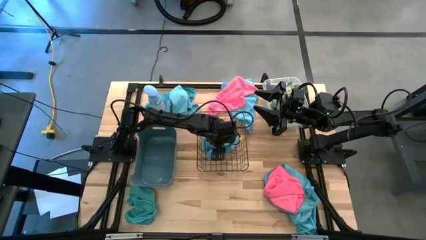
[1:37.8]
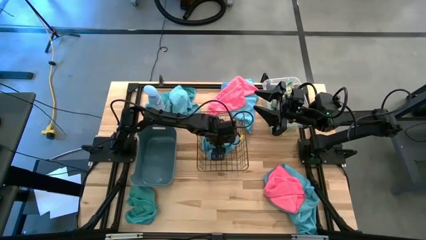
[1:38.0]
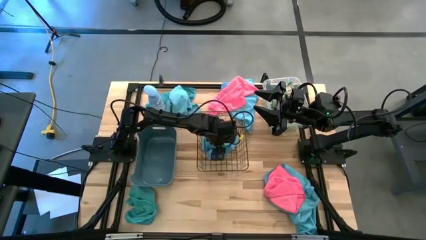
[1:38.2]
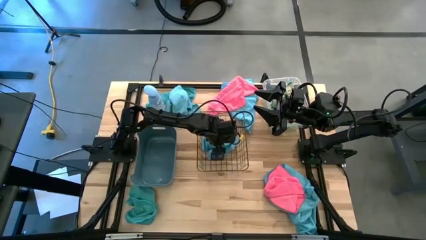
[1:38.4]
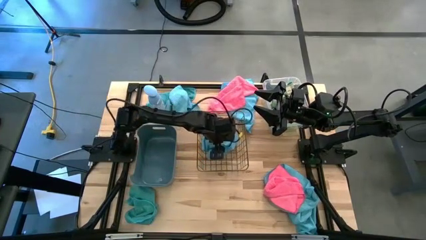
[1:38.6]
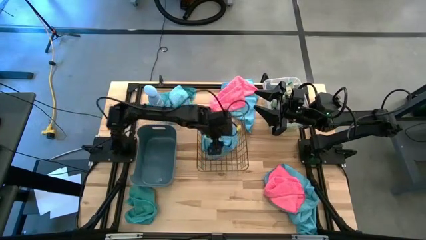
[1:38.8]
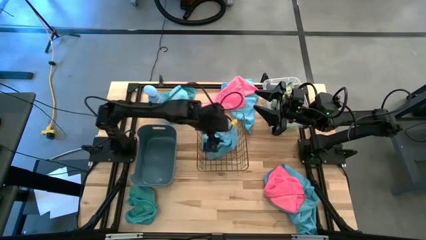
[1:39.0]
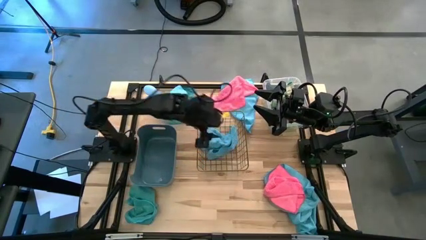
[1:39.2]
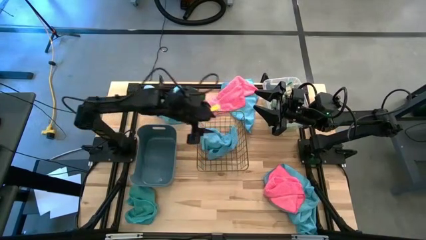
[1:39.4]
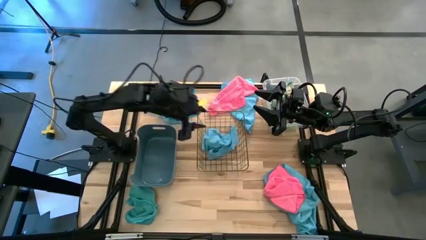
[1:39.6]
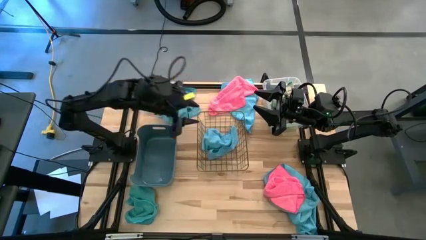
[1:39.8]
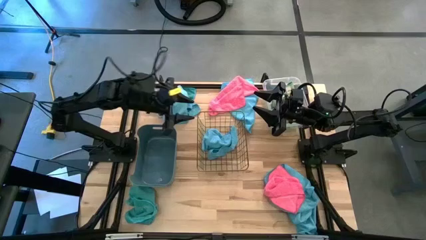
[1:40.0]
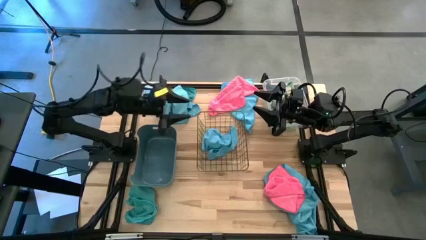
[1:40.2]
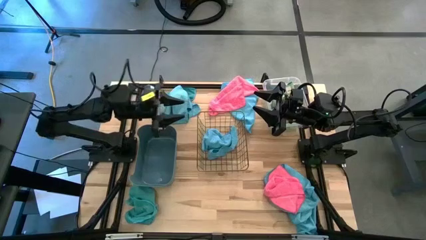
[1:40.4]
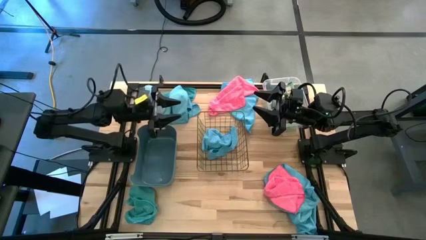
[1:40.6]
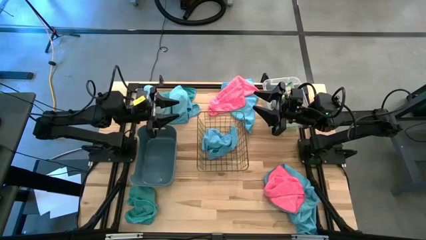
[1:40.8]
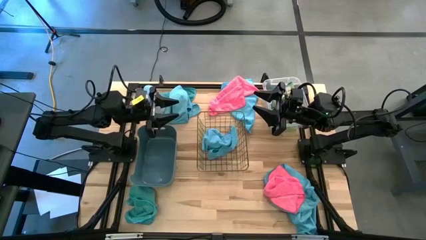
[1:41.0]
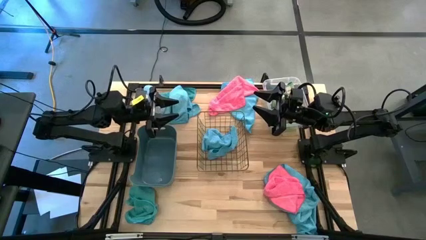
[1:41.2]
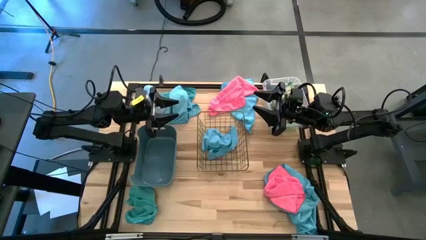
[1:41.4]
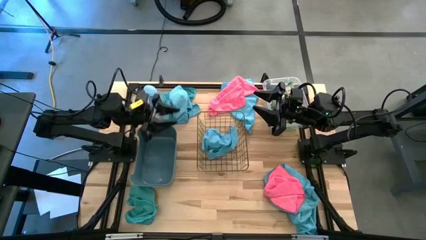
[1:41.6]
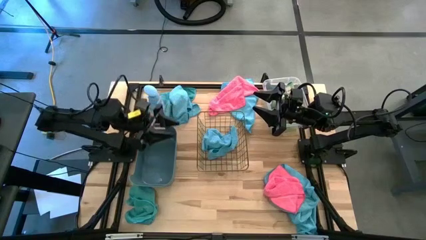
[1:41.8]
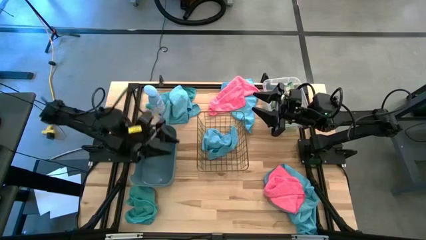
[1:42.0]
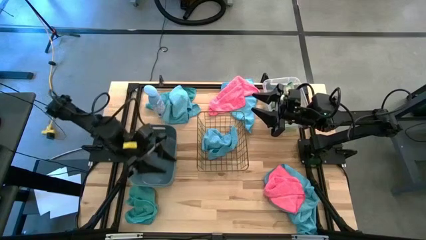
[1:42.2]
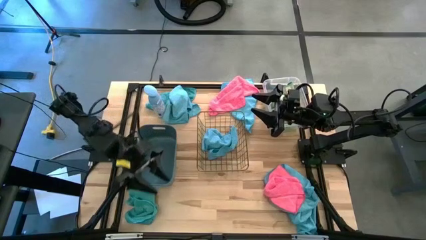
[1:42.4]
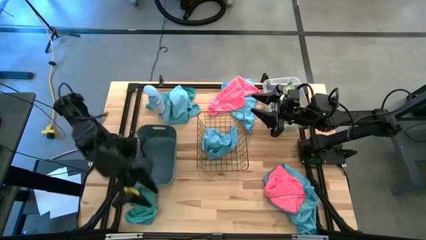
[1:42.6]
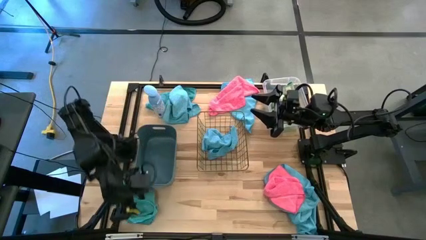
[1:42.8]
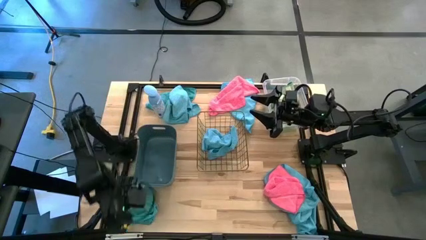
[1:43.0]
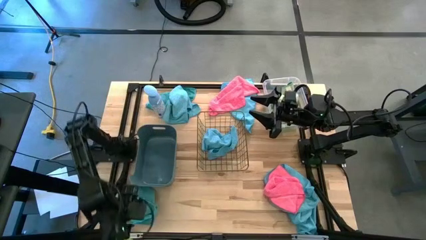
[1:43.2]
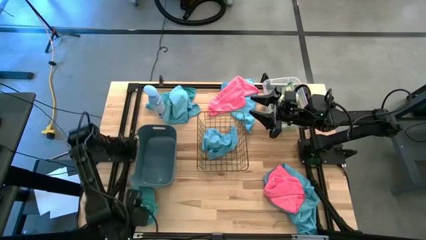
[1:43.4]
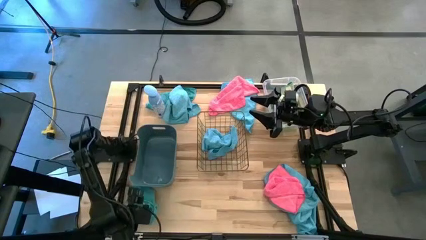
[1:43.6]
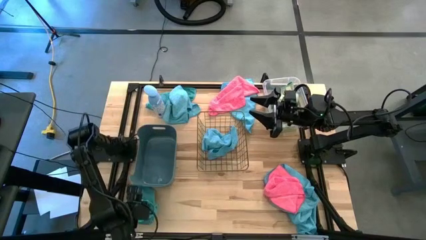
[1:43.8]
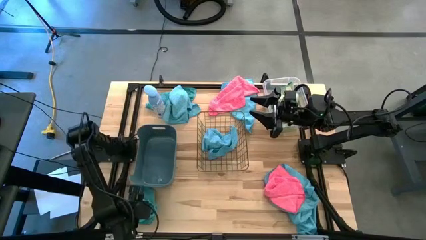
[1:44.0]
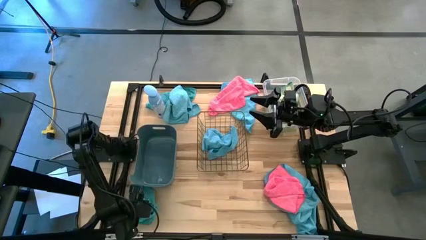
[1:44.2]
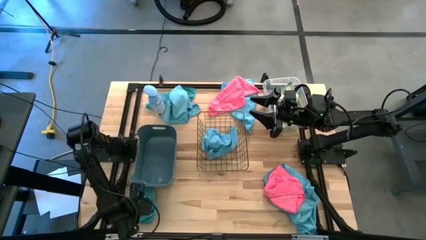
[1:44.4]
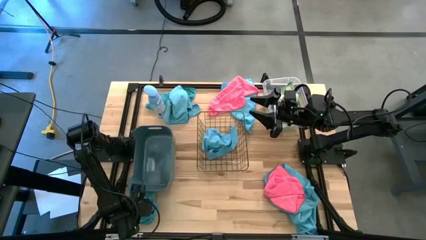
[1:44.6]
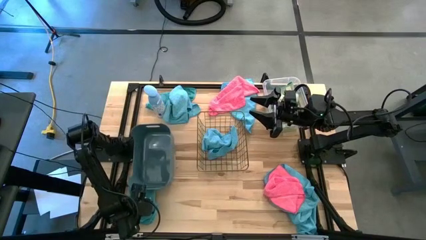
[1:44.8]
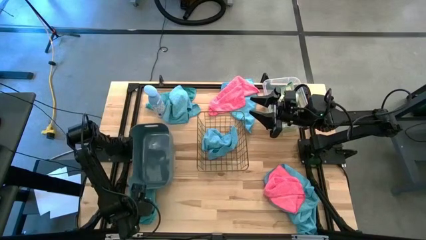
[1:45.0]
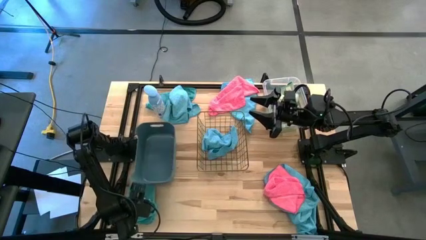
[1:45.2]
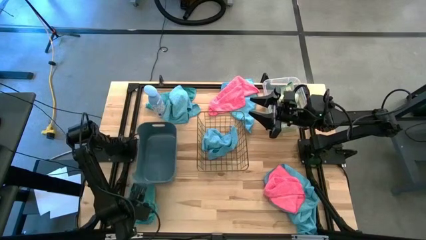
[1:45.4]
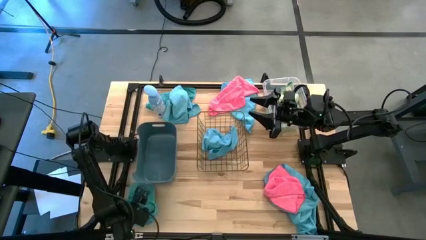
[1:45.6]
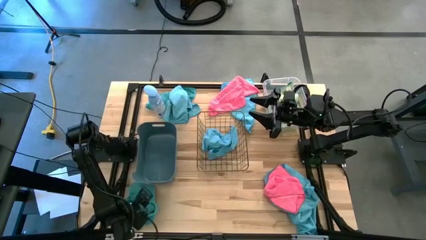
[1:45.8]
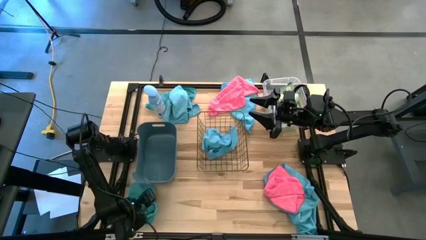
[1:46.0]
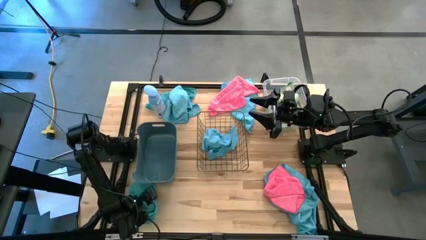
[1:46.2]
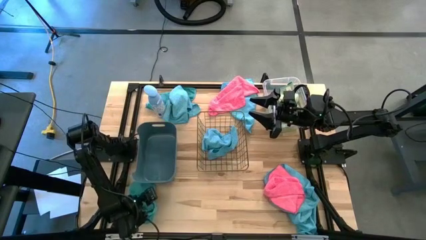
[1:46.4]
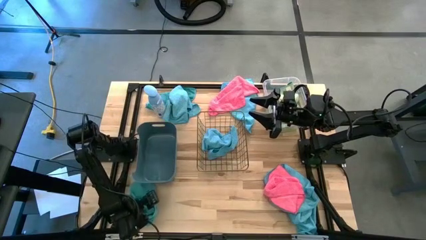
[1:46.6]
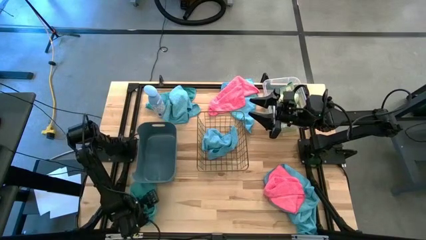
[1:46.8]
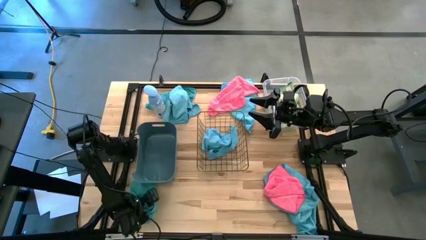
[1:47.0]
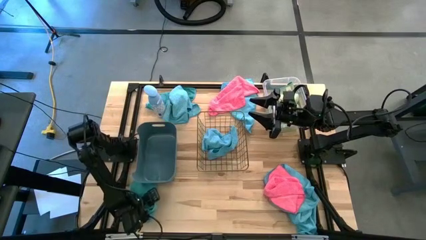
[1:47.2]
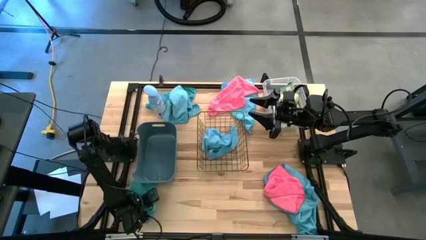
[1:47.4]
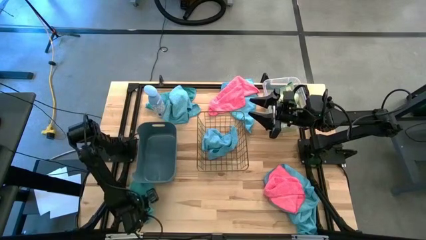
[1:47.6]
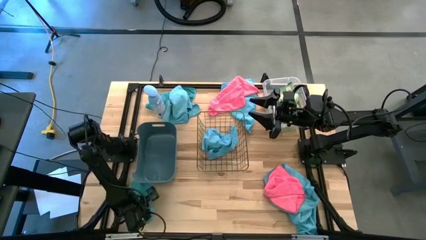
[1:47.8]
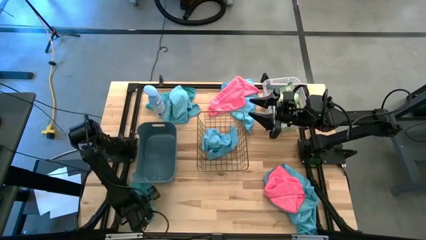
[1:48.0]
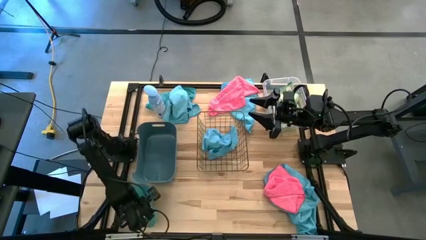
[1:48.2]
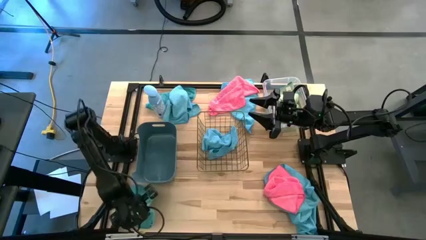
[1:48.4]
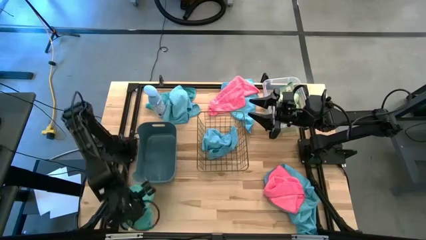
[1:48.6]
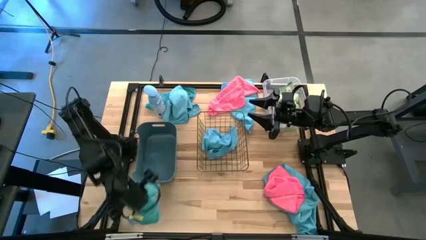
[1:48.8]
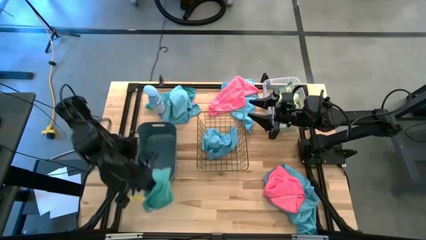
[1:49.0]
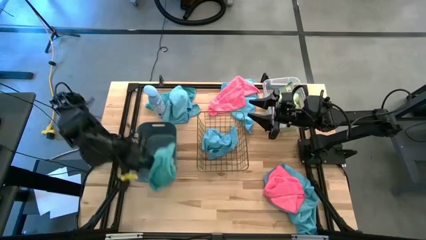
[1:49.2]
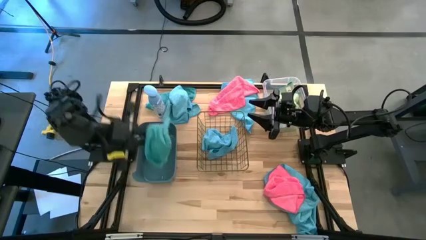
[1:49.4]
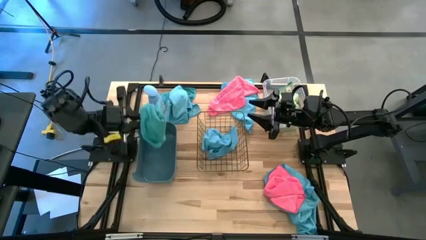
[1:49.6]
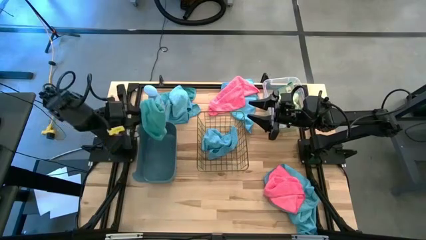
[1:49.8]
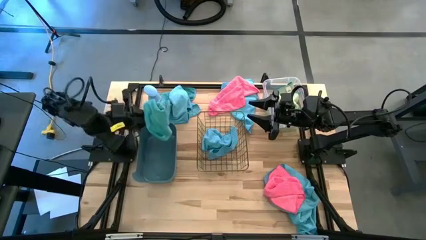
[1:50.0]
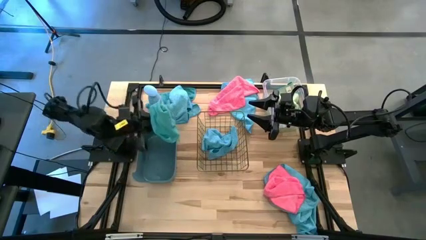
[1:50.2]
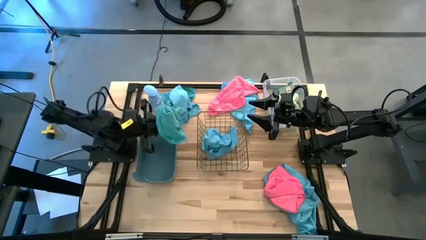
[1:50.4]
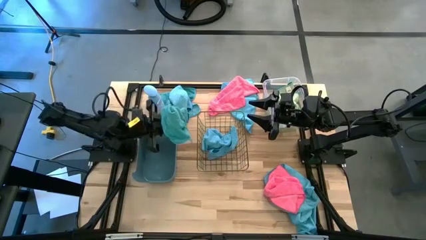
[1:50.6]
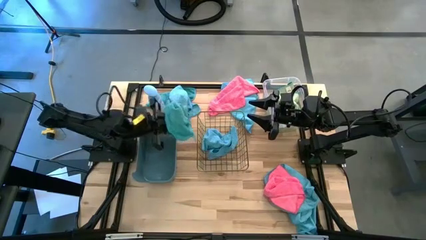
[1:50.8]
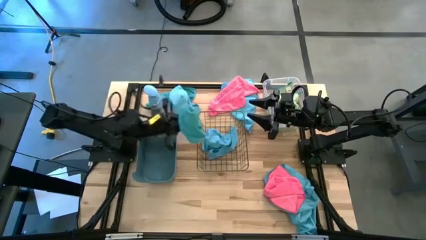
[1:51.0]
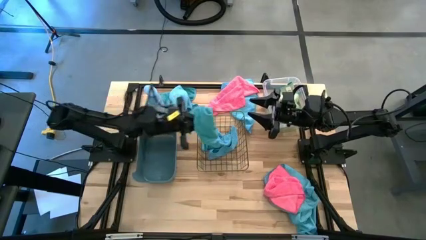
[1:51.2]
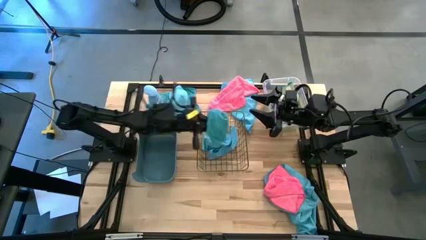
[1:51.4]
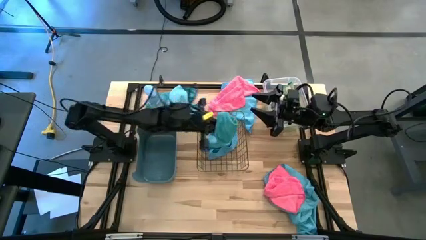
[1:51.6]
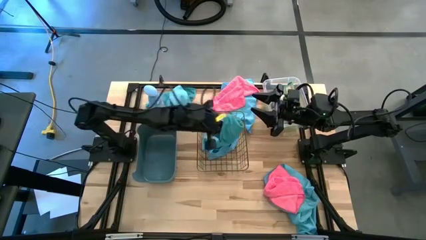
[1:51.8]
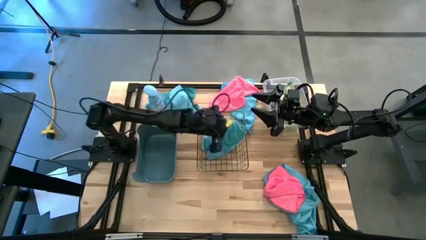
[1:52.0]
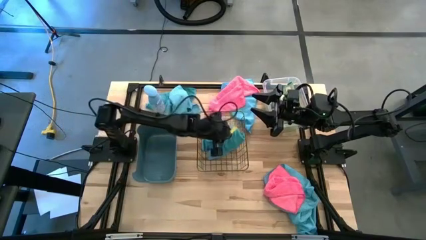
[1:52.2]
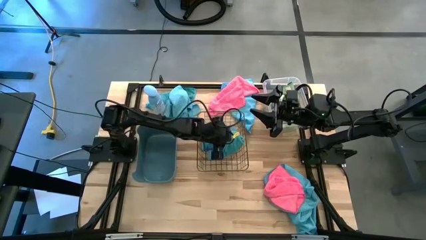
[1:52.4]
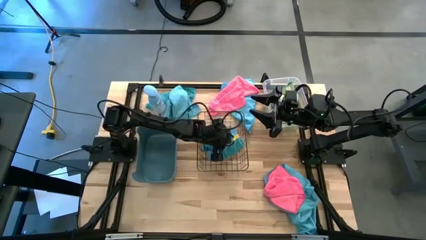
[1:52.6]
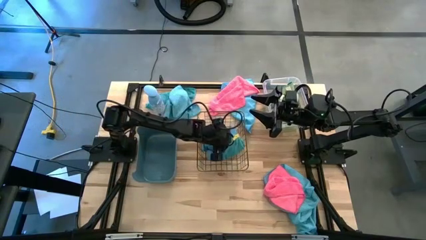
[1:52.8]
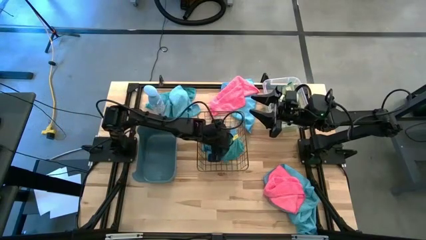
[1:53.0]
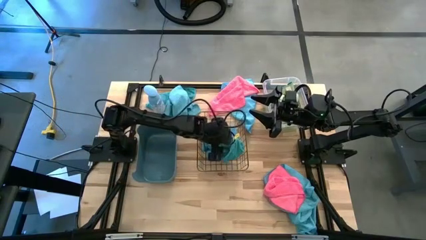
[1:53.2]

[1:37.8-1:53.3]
Task: Sort microfiber towel by color & place in baskets
Put the blue towel into the wire basket
